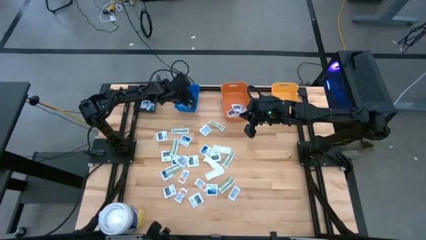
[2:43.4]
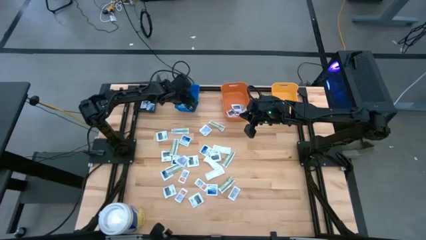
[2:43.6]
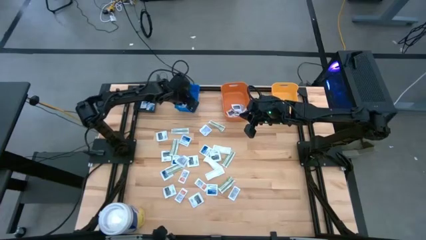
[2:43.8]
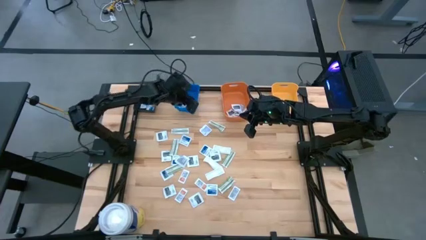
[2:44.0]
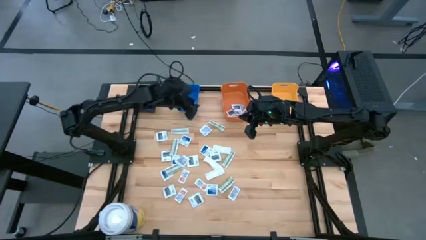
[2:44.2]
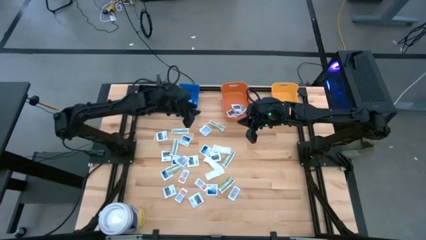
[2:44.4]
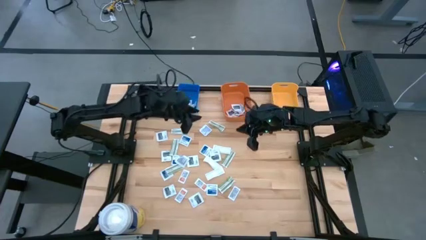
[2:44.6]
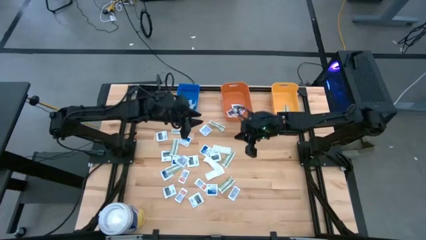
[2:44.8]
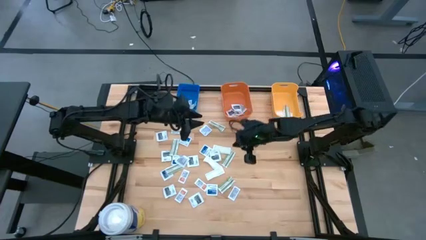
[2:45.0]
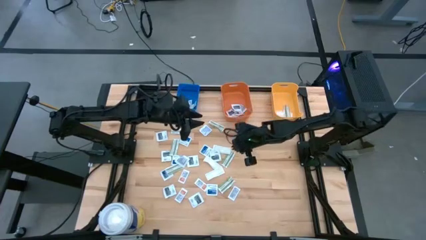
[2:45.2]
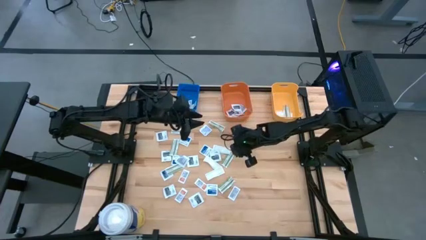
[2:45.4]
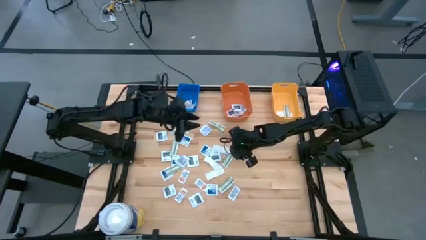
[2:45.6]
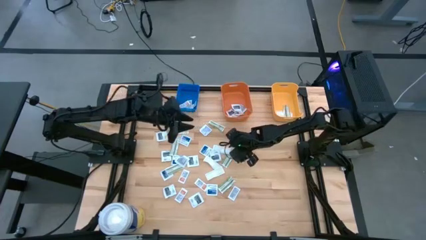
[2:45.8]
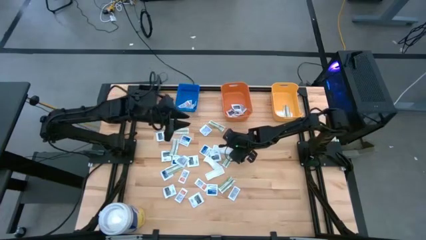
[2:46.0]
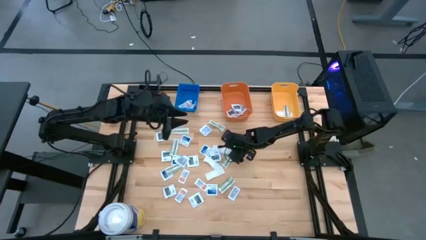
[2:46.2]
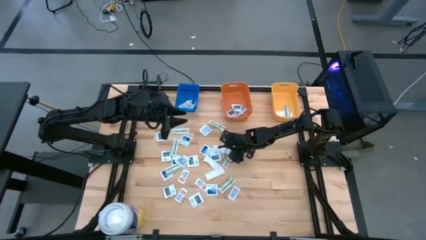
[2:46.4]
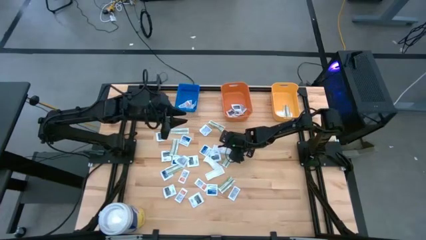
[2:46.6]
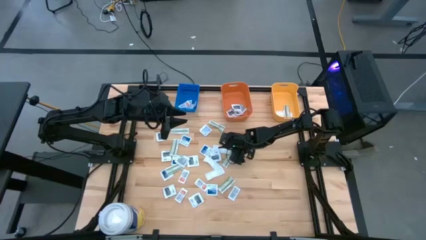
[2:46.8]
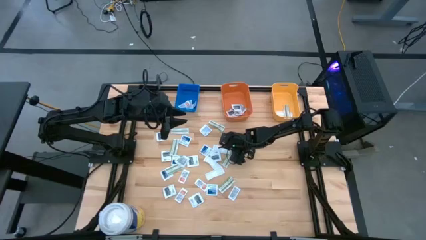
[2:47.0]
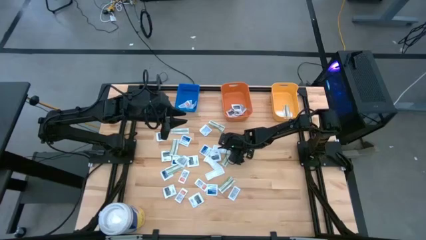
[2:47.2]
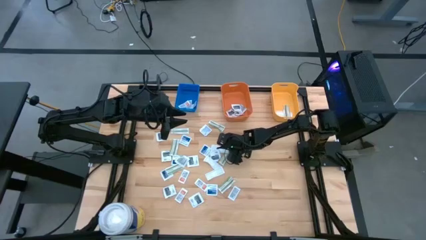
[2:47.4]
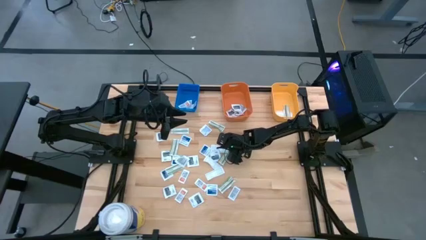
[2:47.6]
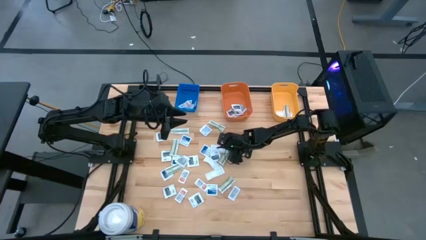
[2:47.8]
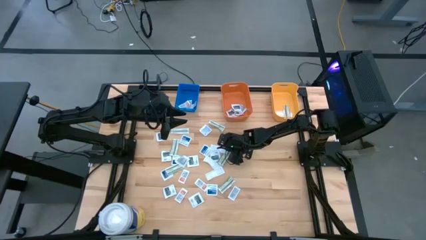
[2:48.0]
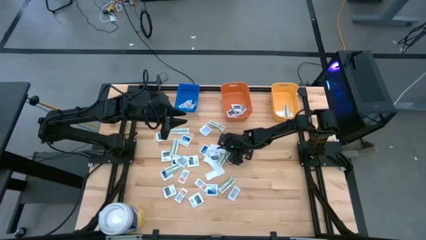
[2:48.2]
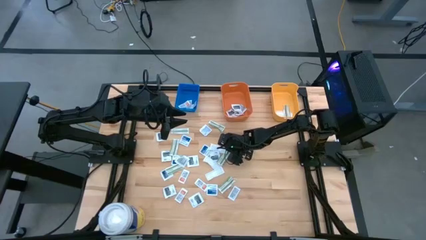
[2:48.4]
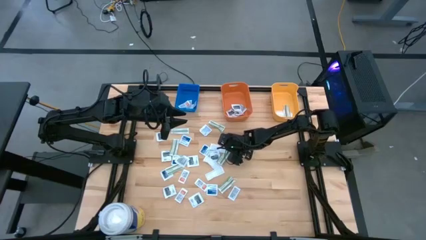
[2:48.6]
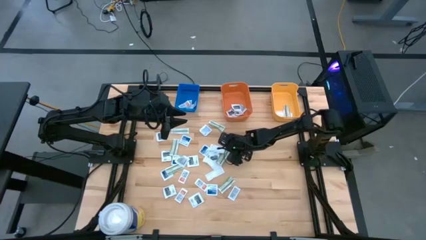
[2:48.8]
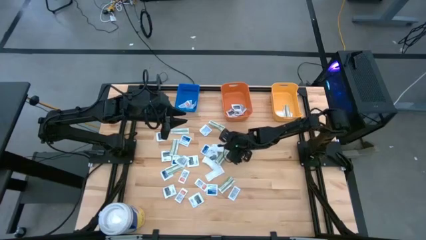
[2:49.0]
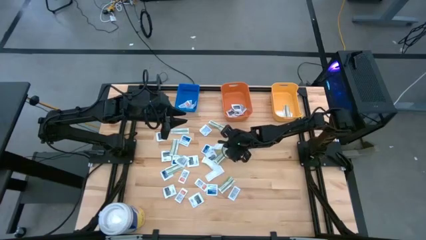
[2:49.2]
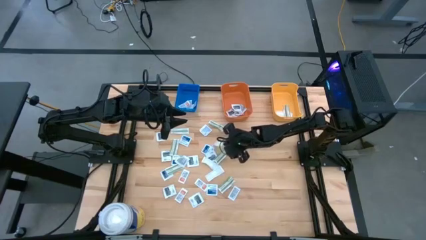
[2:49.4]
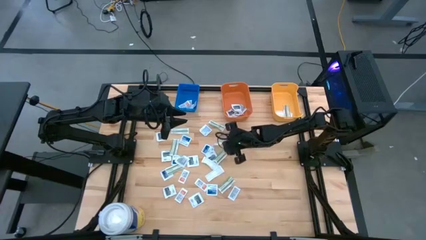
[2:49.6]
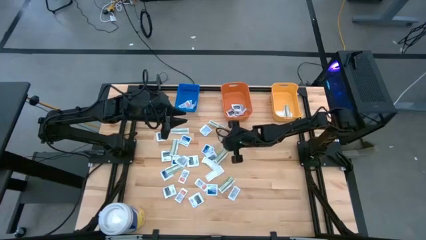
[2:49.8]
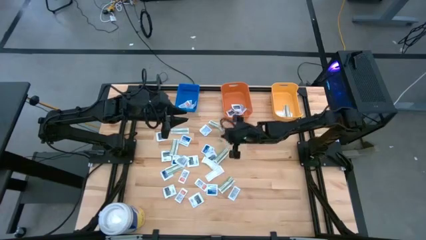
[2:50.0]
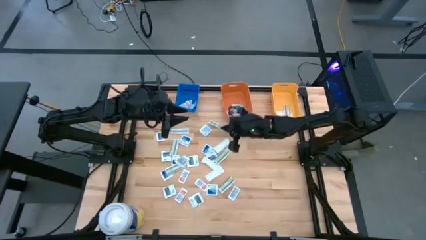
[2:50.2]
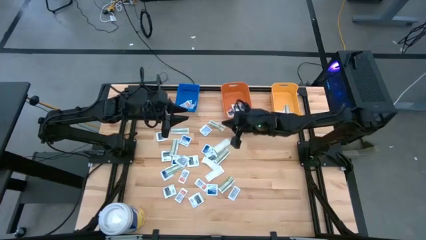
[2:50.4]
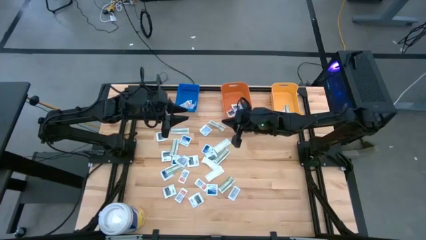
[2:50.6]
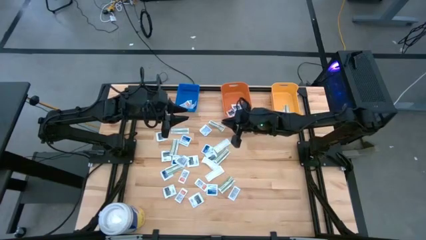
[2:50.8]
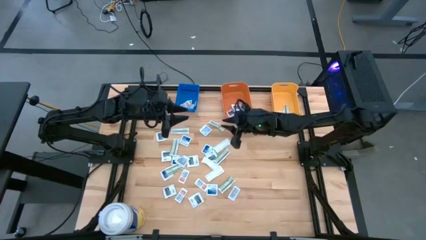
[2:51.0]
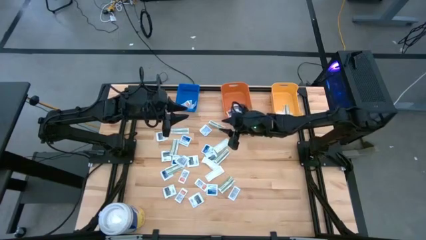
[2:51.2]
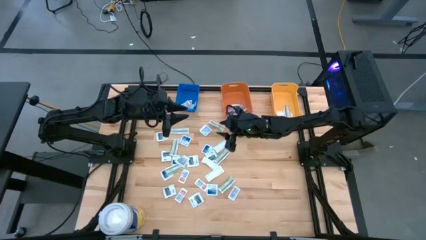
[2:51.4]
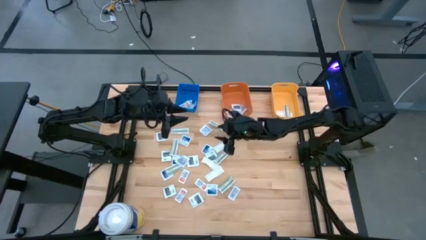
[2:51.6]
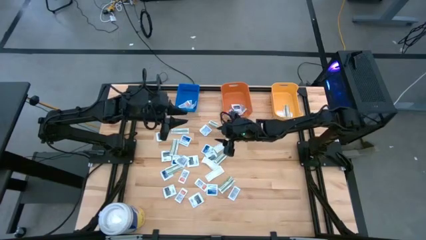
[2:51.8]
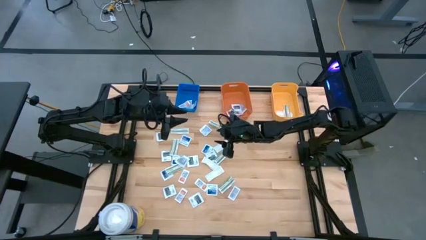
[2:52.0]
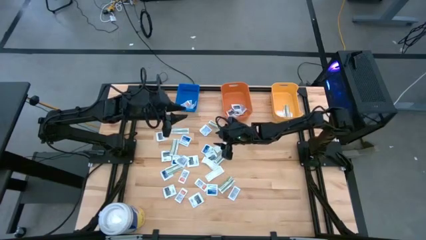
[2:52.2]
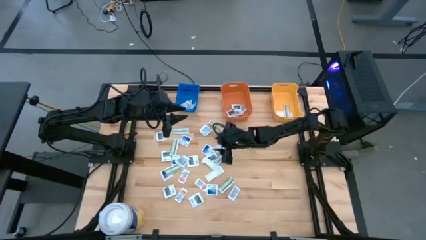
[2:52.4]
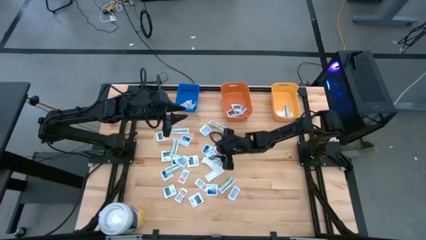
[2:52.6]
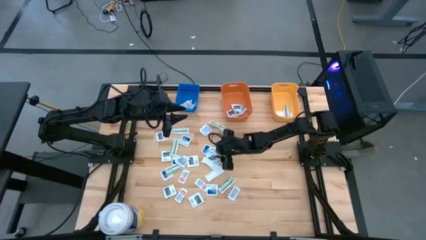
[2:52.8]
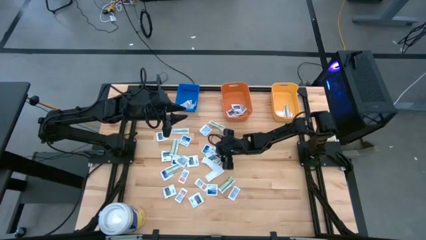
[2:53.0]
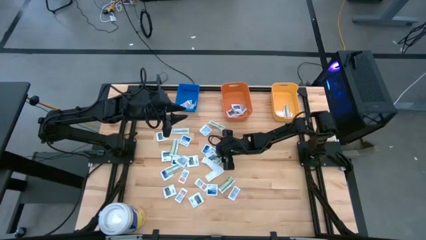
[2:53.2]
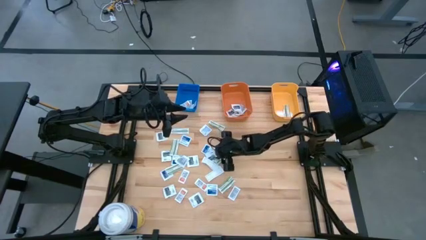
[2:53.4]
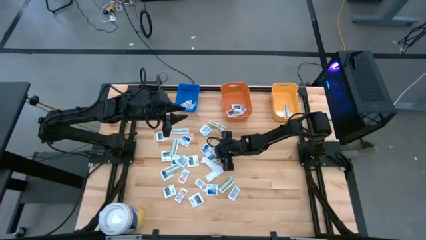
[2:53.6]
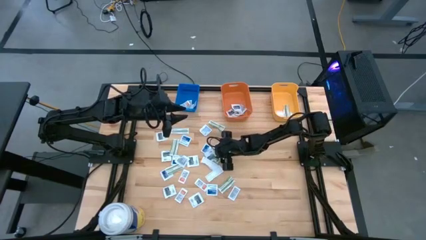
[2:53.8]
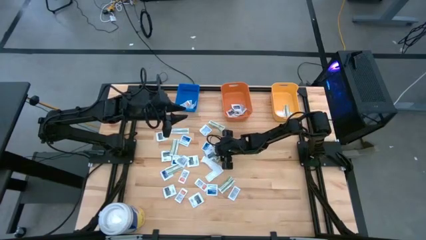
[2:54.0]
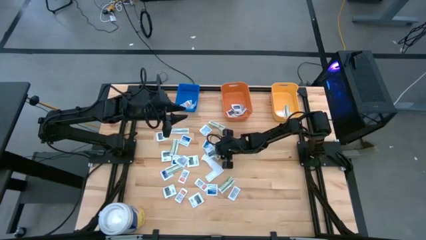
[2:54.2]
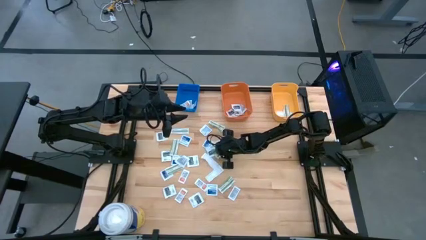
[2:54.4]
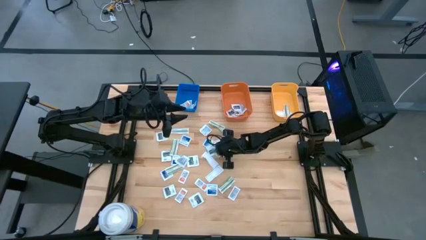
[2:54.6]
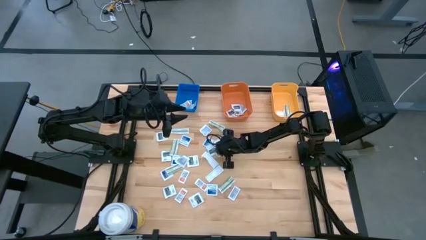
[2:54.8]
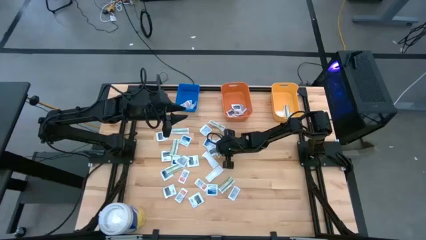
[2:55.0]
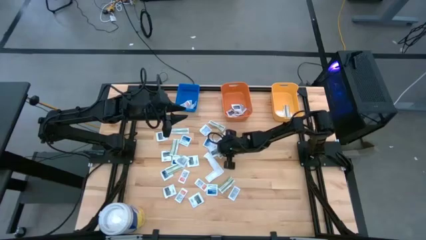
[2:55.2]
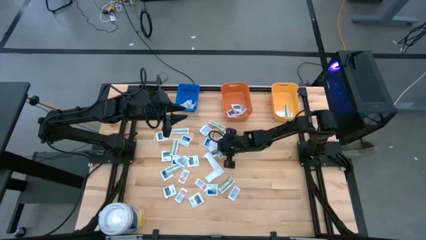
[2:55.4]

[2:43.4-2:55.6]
Task: Pick & Place First Aid Supplies
Put the bandage into the yellow bin

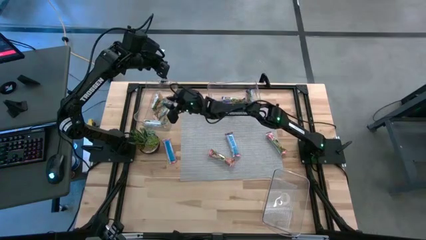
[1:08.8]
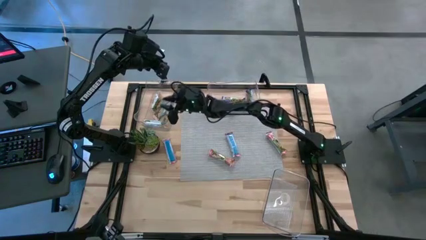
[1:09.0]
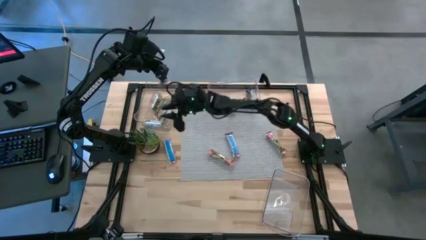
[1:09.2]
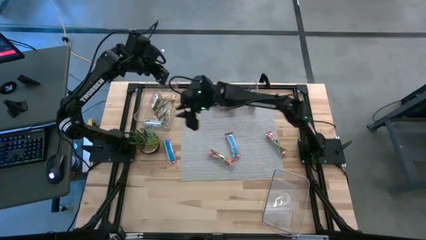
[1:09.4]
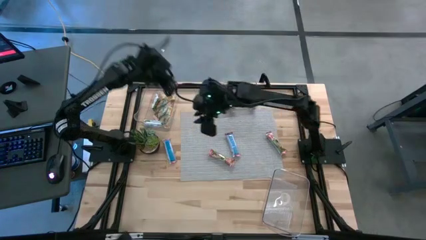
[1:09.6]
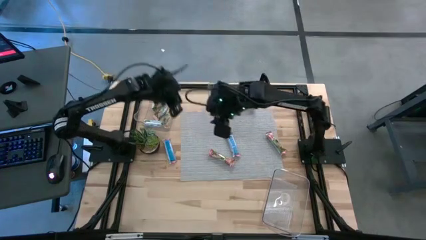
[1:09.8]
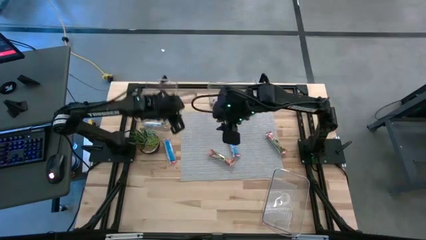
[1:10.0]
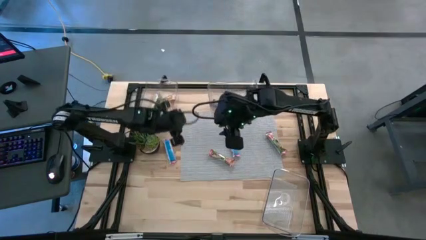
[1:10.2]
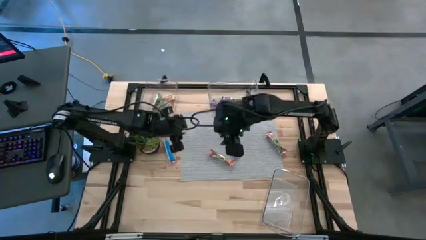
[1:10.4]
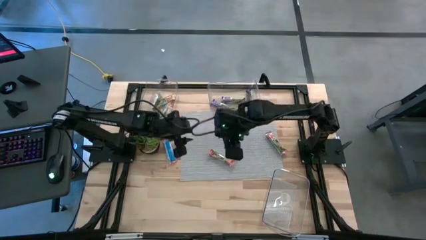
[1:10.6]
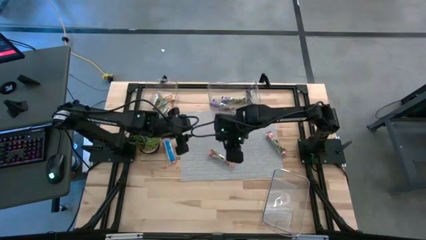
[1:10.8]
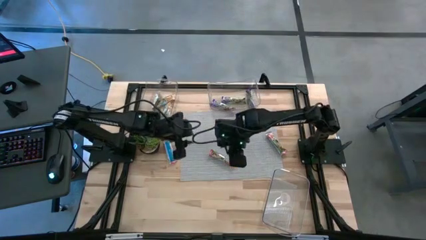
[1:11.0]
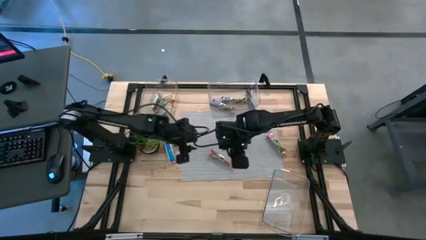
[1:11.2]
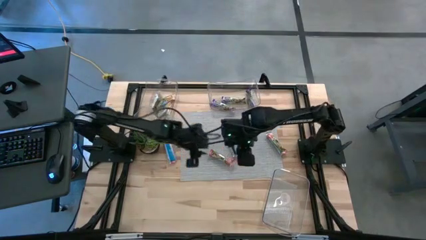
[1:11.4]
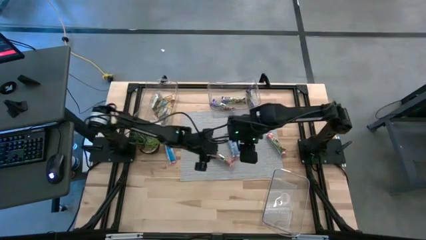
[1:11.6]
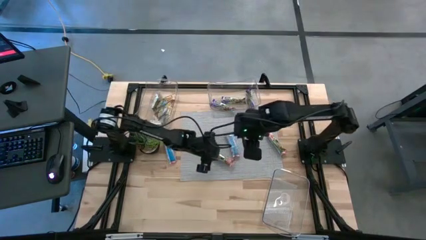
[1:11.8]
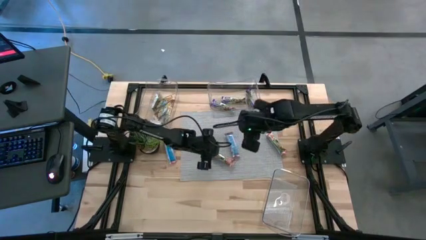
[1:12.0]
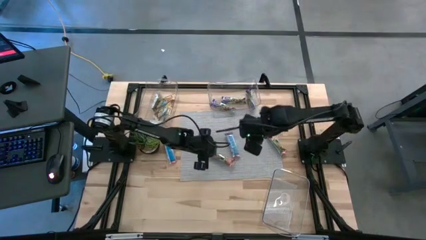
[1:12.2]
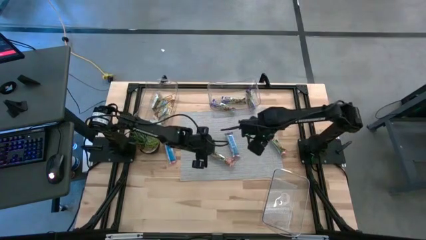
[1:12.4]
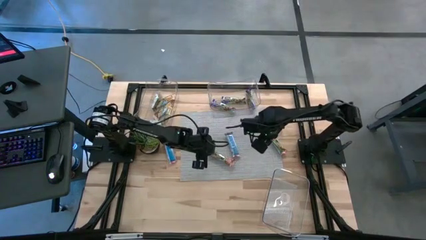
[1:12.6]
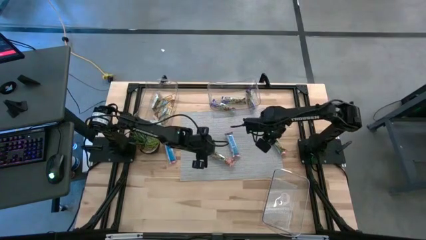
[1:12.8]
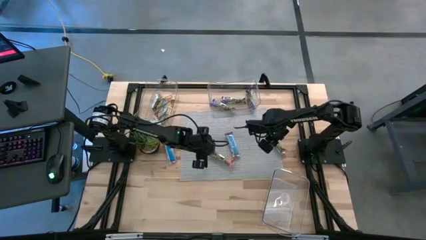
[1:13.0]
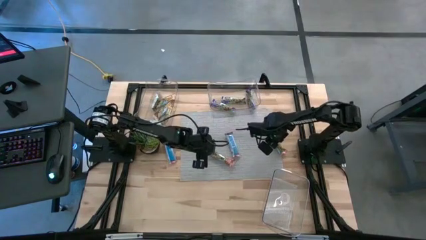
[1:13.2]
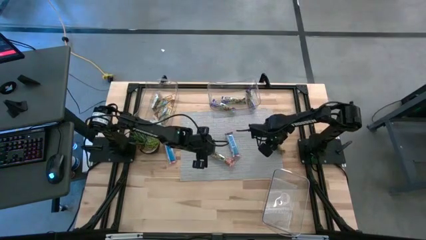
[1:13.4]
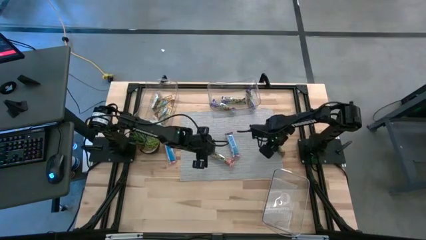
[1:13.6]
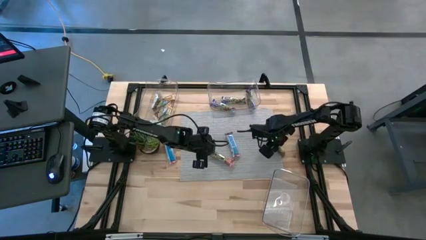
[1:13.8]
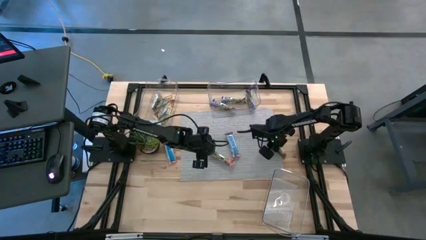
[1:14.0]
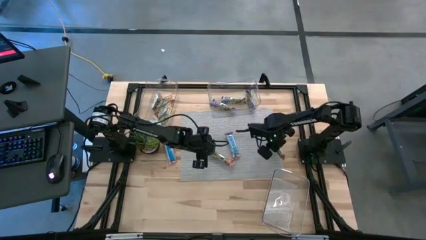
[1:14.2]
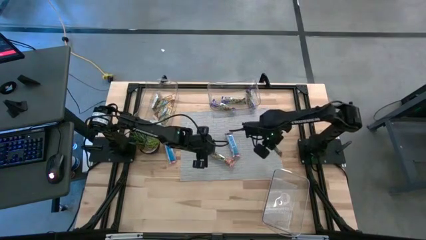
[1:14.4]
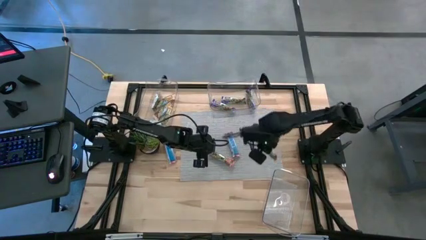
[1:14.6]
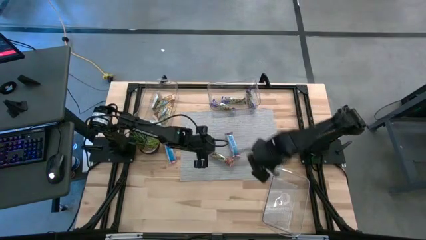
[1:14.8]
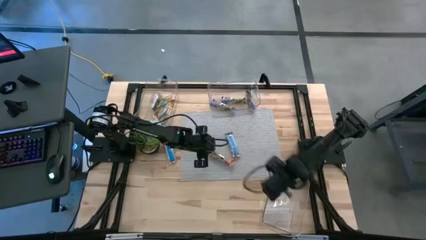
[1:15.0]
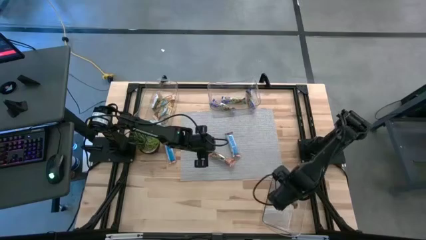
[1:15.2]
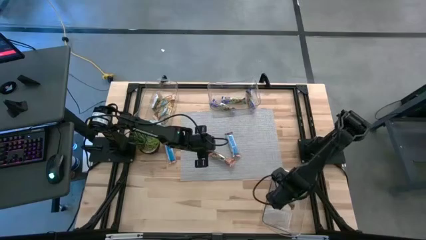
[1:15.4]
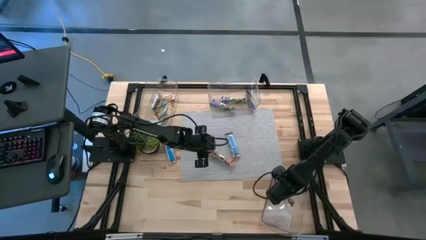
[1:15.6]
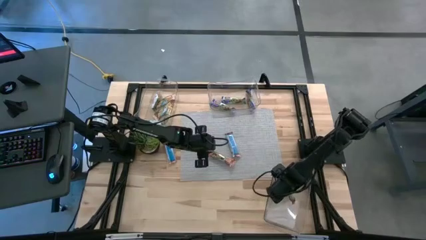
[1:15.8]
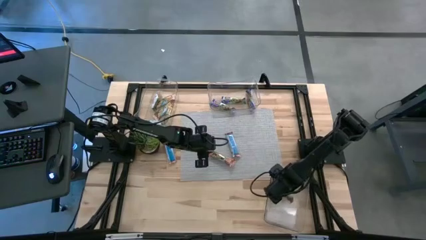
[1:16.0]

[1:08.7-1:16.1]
Task: Pick and place Granola Bars by type
Put the red granola bar into the bottom transparent bin
